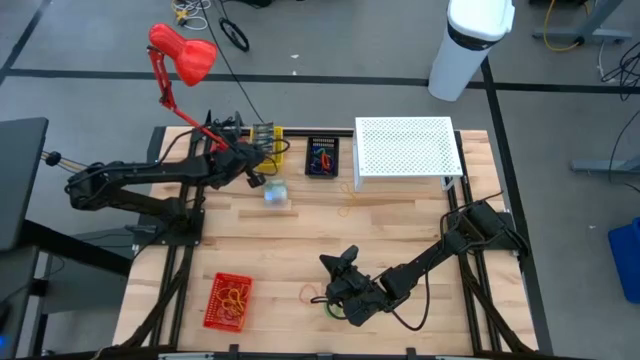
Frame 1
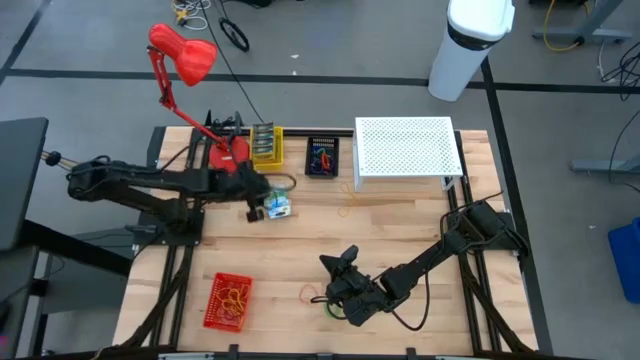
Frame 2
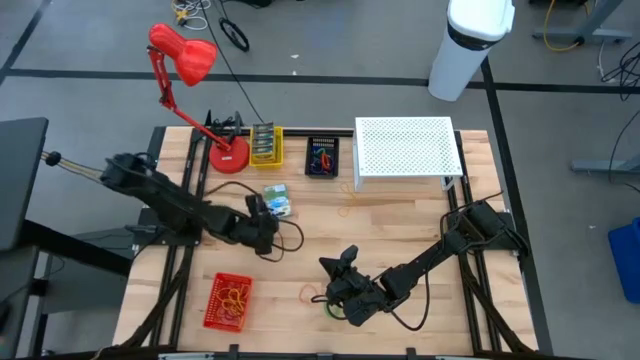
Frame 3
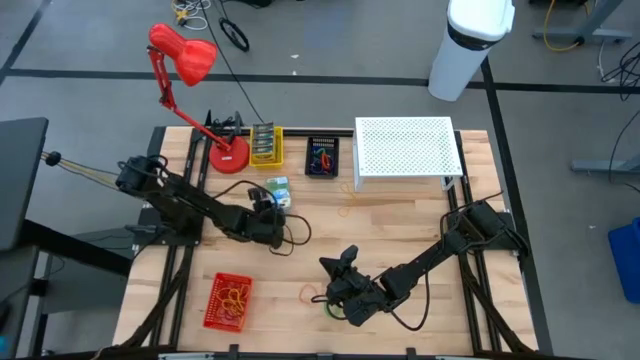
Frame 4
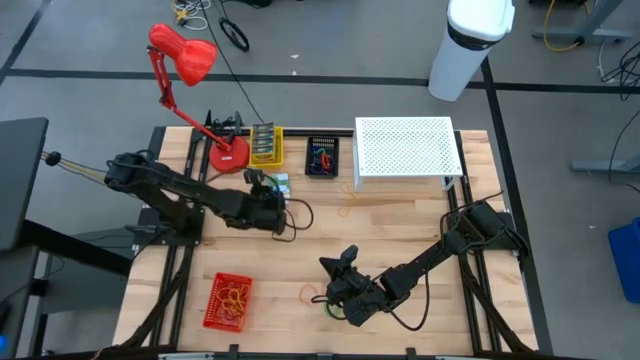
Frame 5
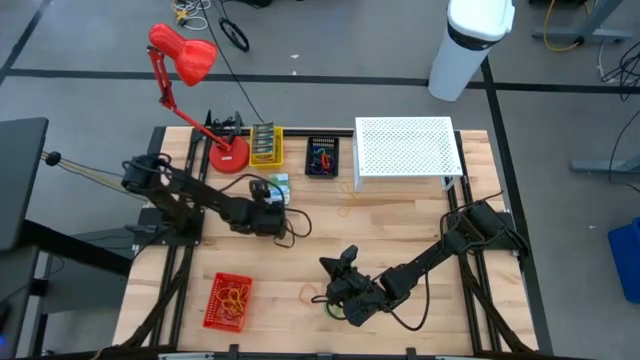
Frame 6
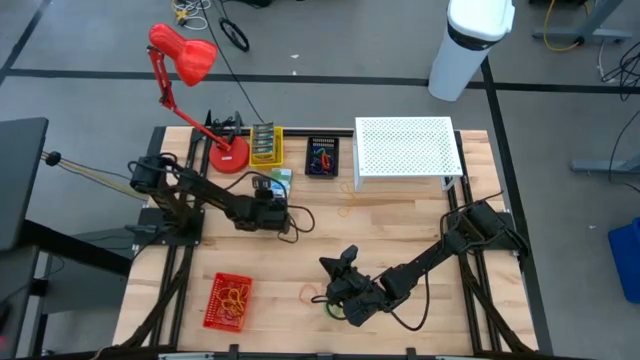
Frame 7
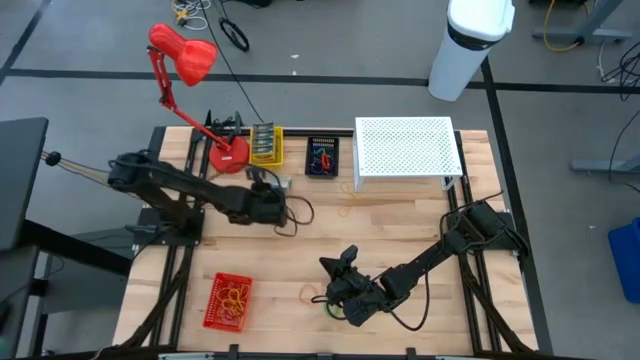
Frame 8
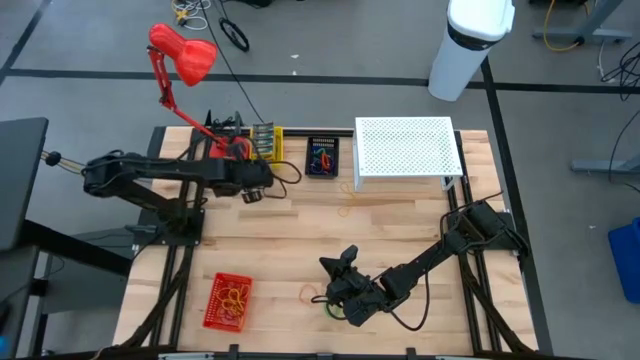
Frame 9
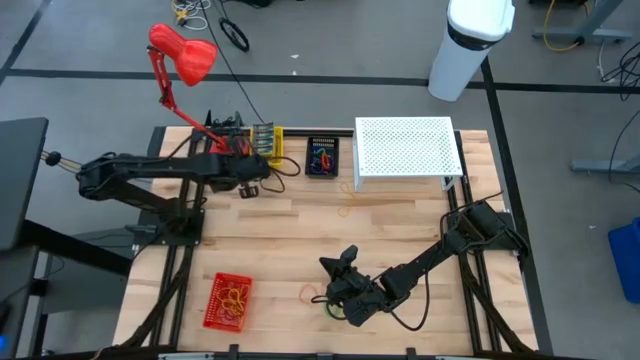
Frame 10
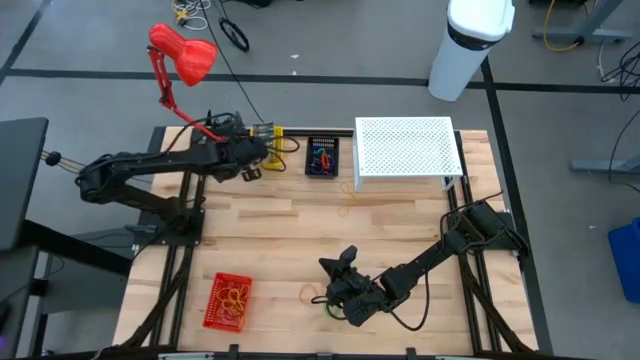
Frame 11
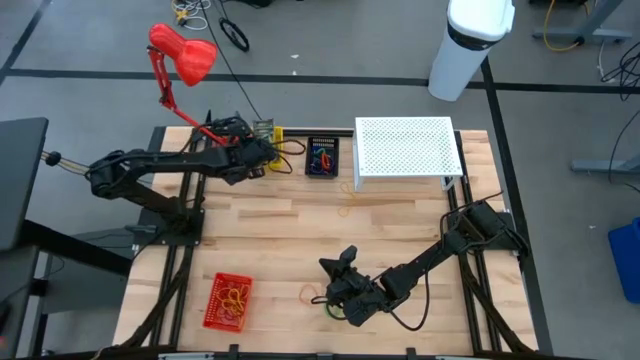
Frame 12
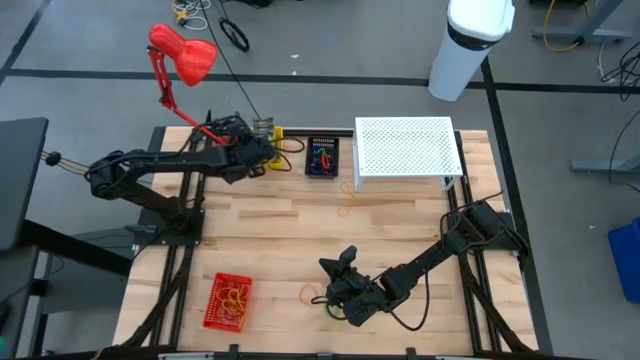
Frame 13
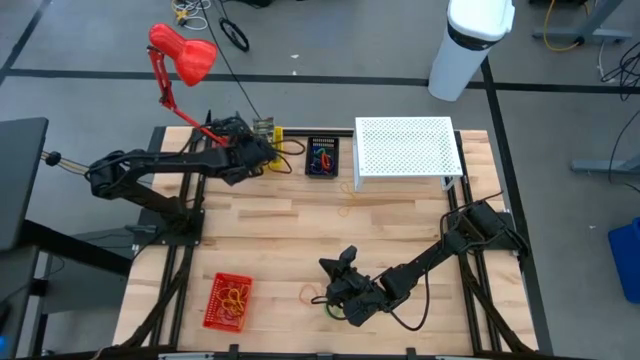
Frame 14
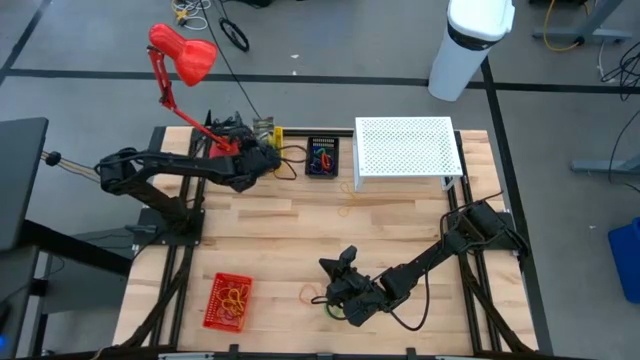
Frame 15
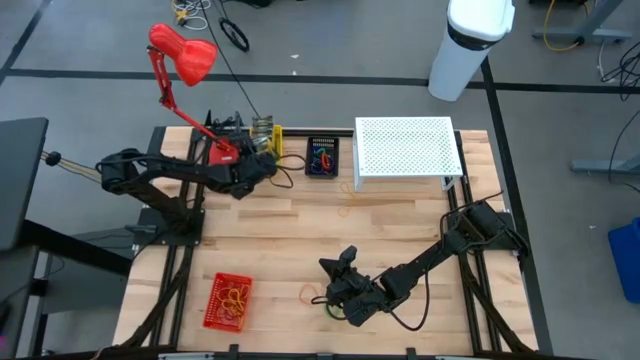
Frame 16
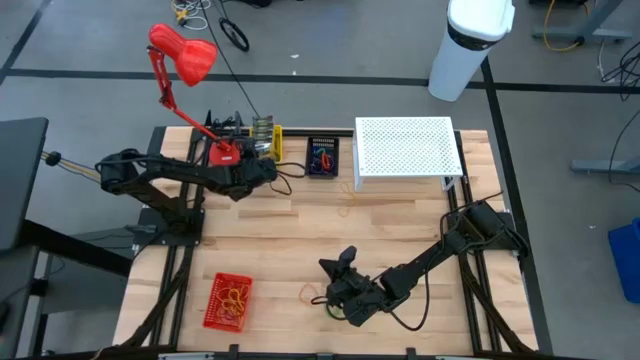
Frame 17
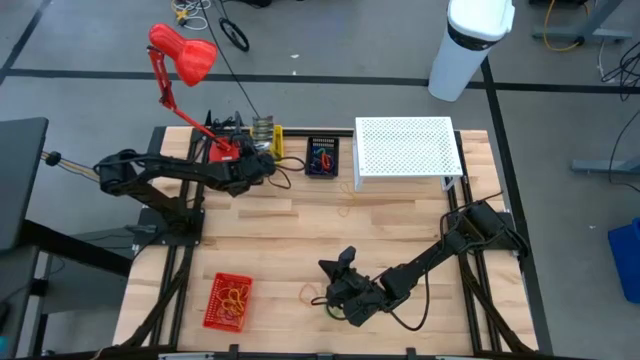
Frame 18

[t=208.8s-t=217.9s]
Task: Pick & Place Office Desk Supplies
Put the yellow crayon box into the yellow bin

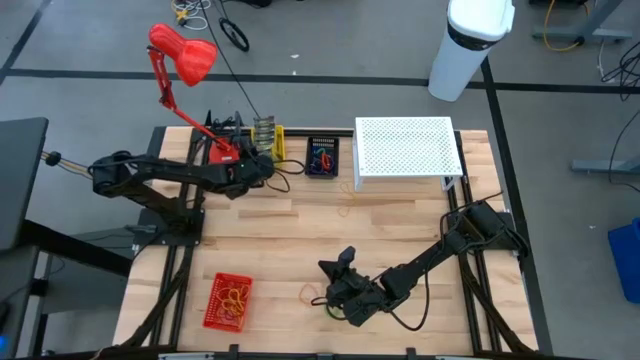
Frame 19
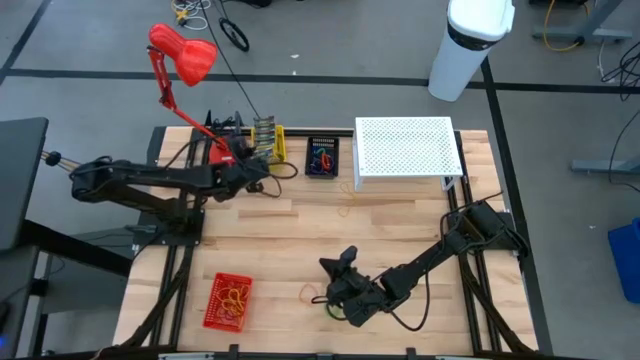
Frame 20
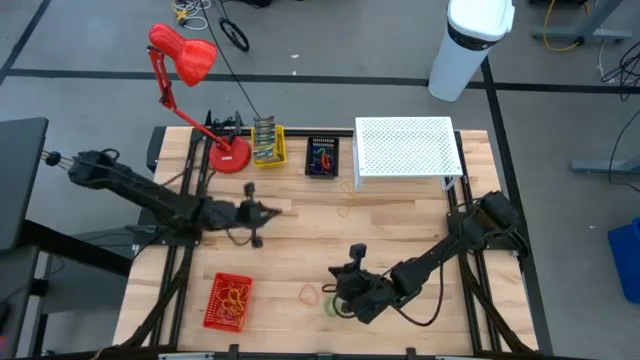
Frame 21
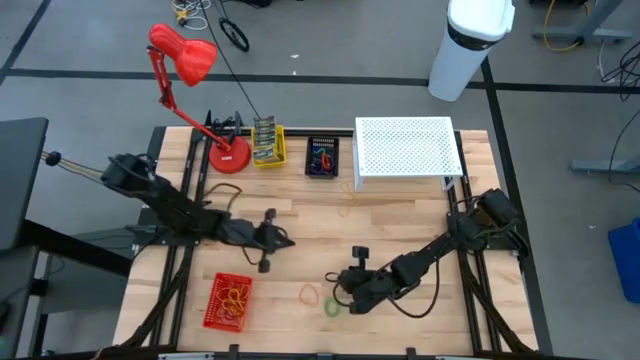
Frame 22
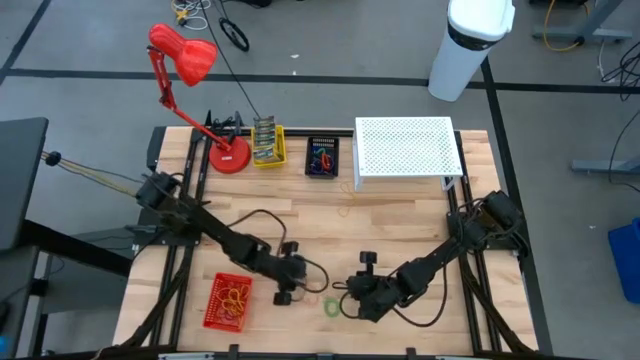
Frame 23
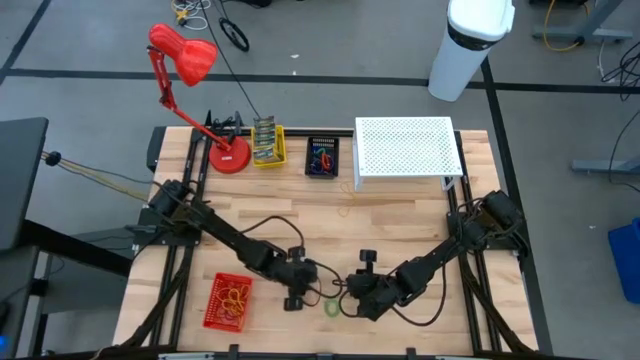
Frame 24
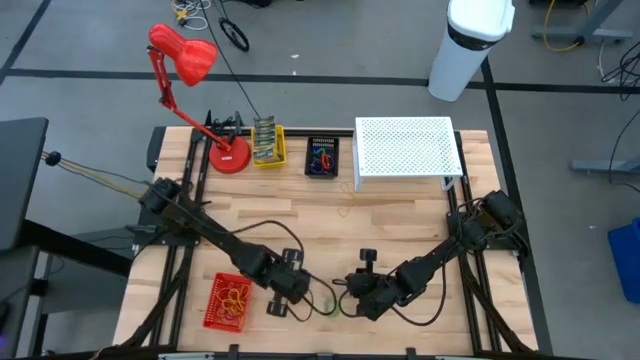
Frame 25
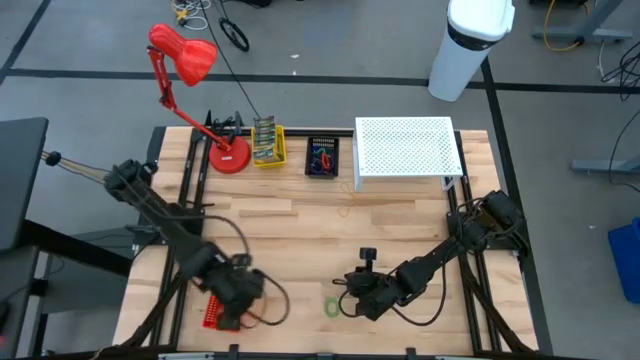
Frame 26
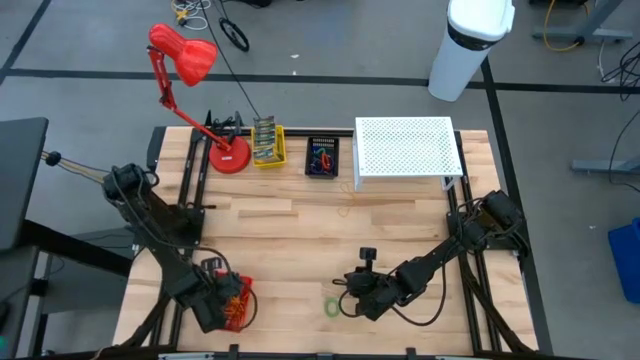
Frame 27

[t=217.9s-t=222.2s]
Put the orange rubber band into the red bin

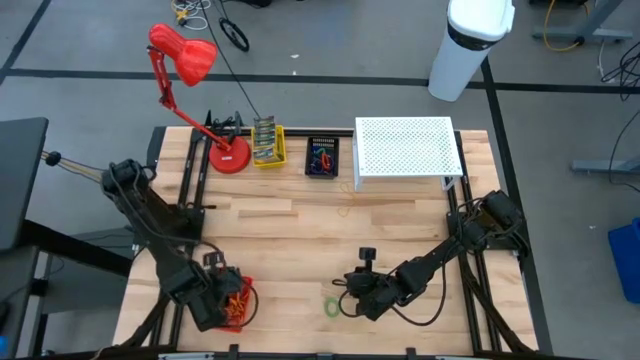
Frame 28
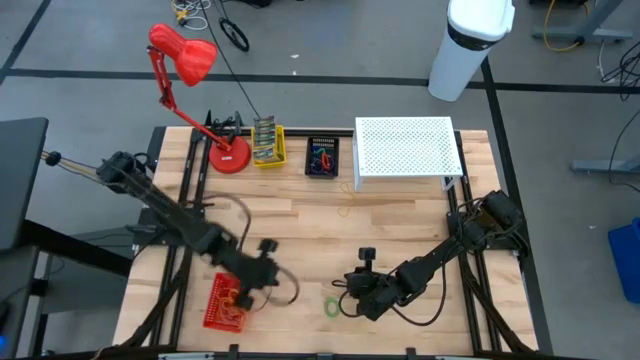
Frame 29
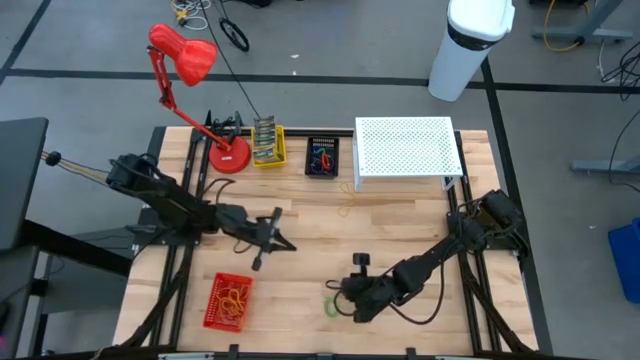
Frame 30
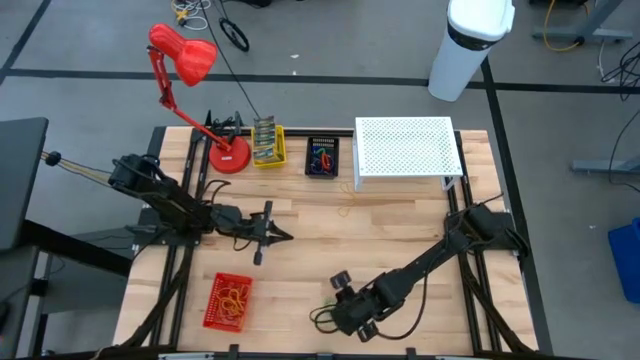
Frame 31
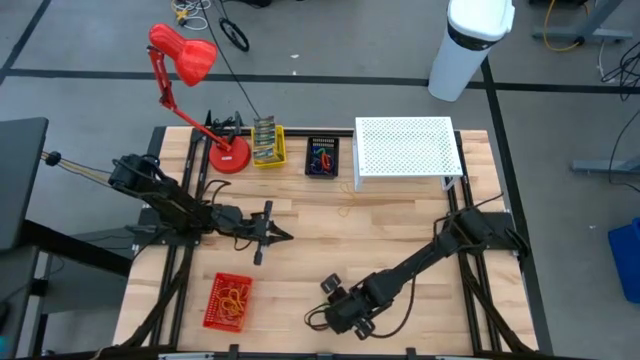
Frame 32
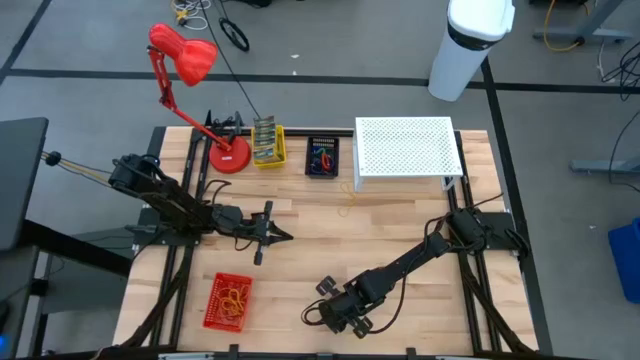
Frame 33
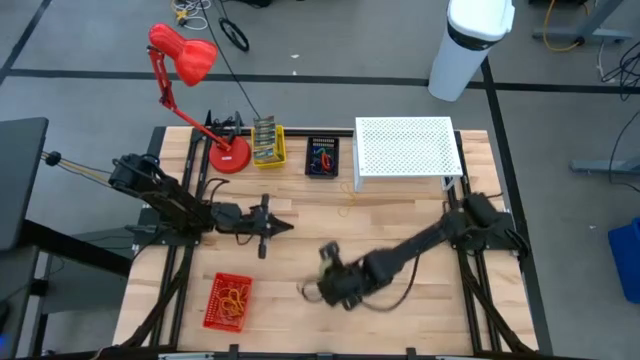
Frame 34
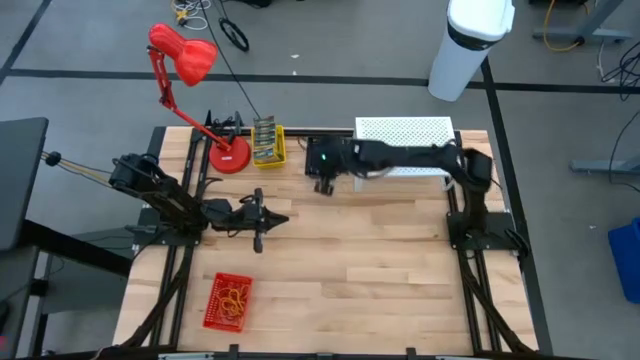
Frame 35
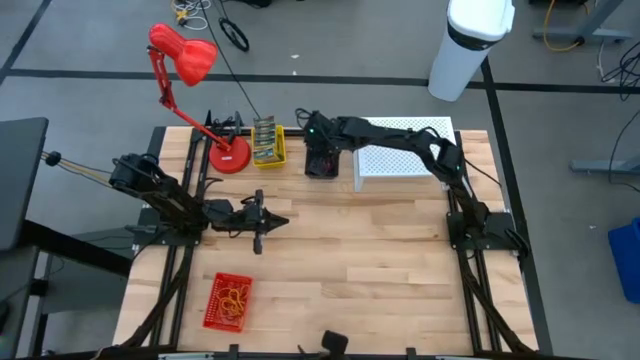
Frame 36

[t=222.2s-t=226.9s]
Put the green spring spiral keychain into the black bin
